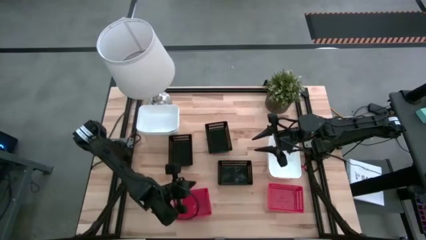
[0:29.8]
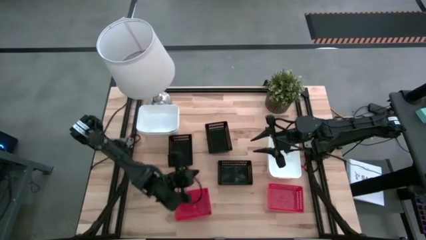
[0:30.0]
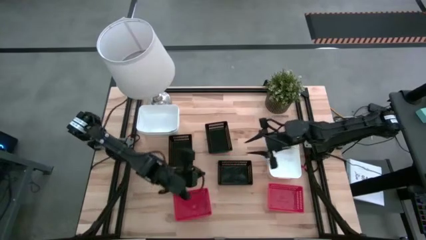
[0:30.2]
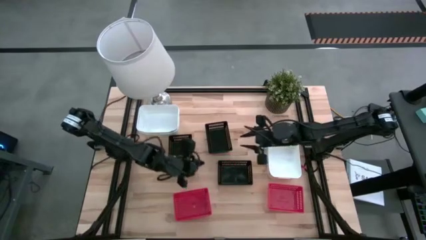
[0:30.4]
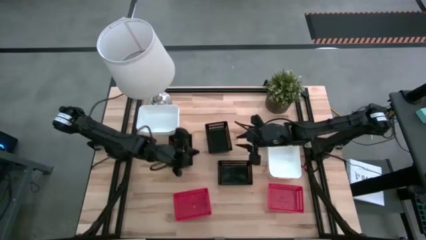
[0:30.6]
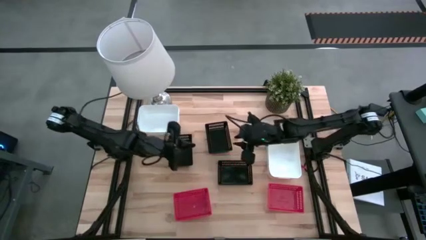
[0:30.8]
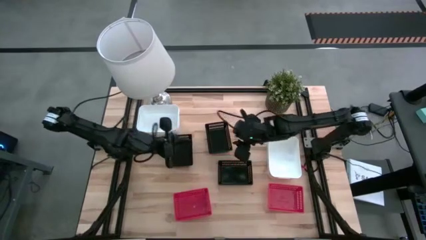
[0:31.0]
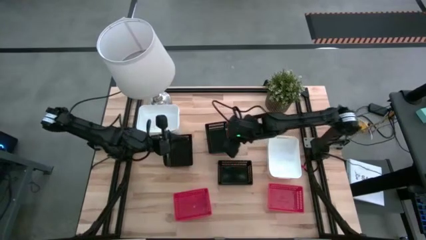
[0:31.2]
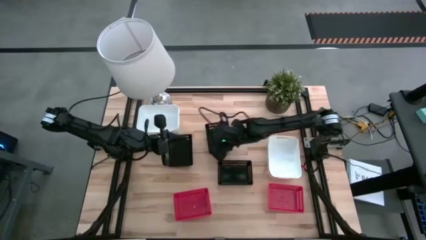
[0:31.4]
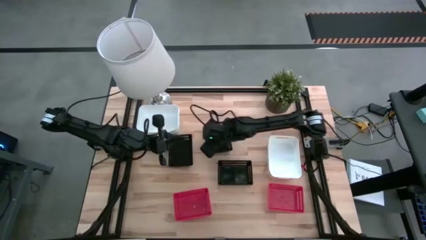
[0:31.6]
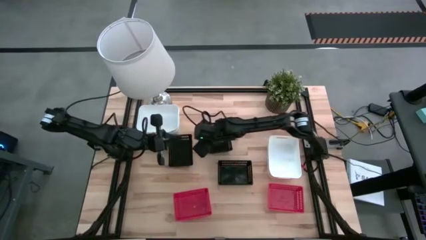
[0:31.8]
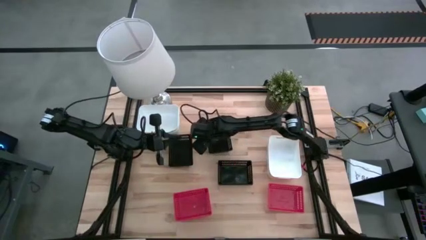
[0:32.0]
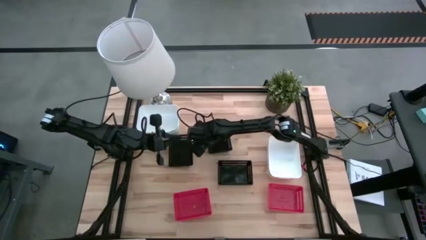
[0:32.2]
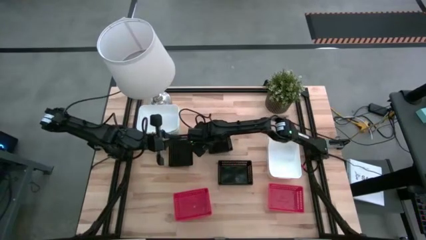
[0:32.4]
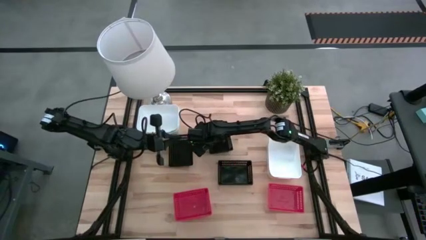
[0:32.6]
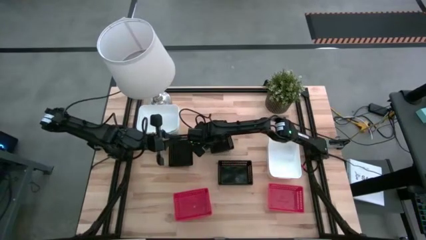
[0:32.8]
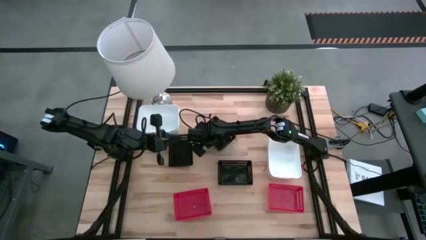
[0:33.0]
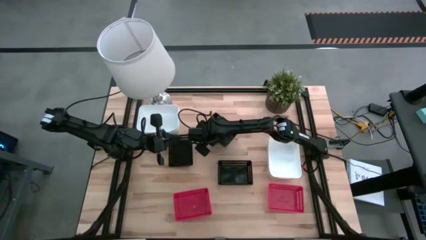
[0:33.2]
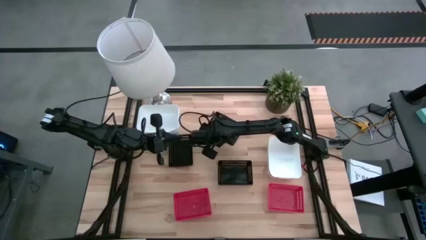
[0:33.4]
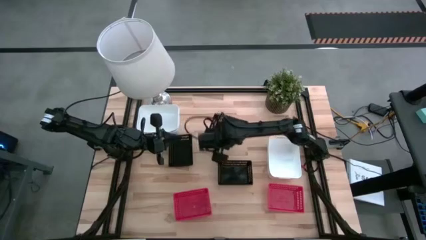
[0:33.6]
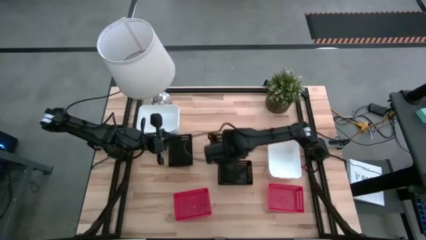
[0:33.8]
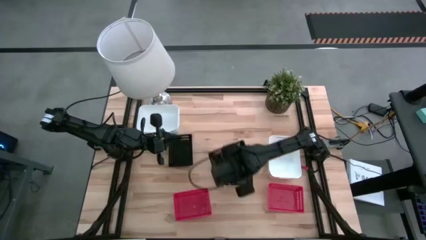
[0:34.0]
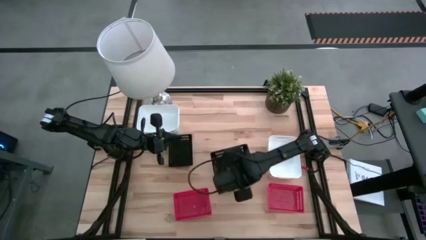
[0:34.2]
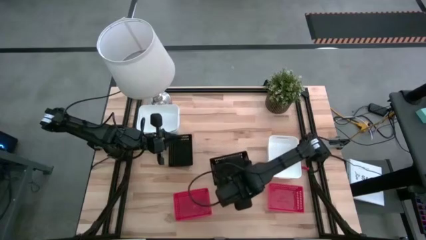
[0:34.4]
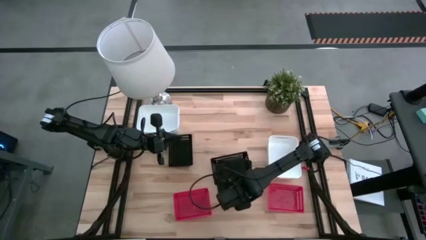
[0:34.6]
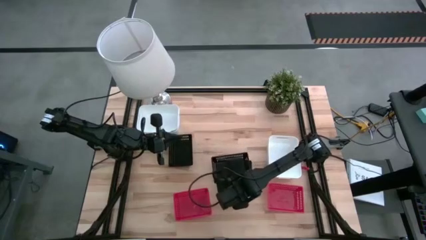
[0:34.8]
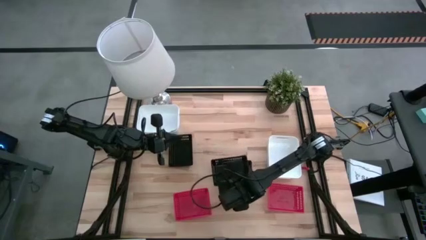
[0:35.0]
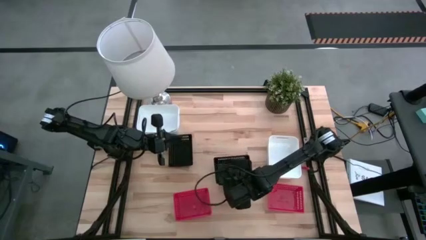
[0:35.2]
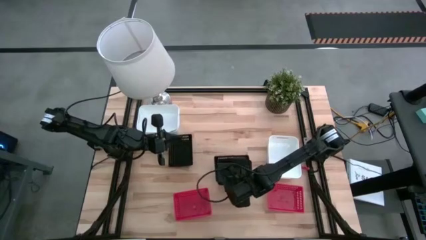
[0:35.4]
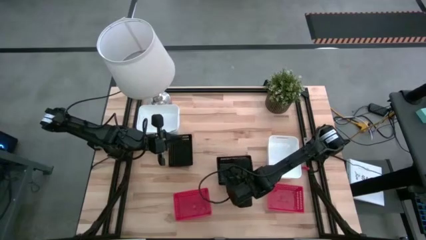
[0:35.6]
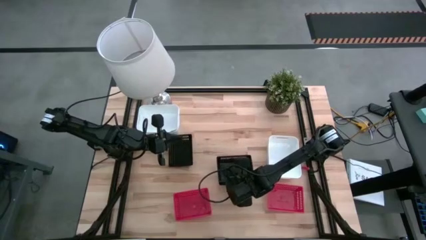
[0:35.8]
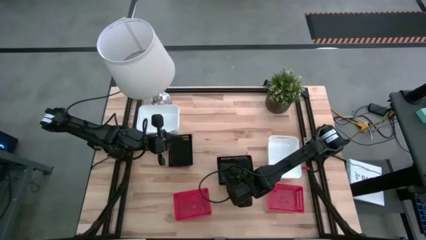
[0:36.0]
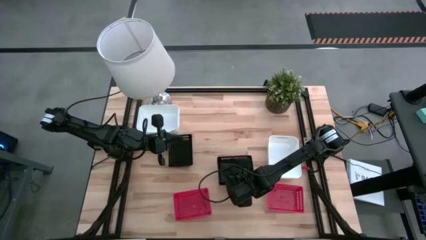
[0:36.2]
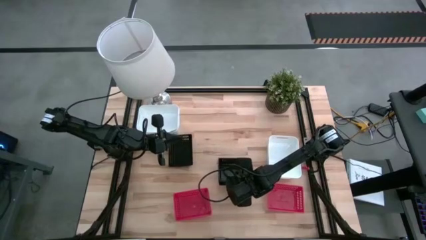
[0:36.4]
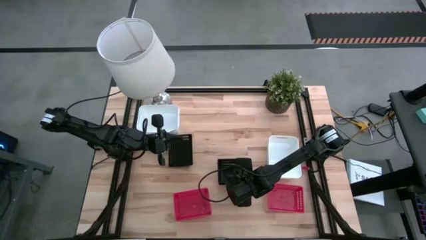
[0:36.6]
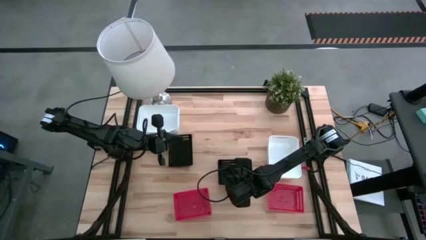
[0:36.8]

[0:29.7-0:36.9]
Stack the top right black bin on top of the bottom black bin

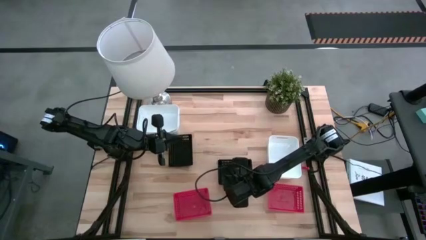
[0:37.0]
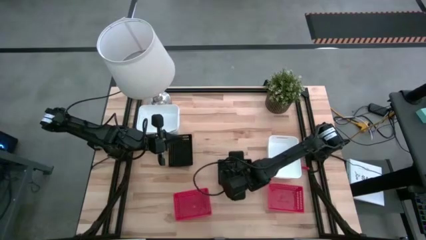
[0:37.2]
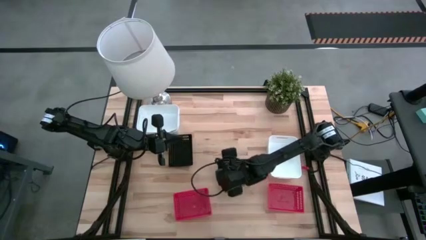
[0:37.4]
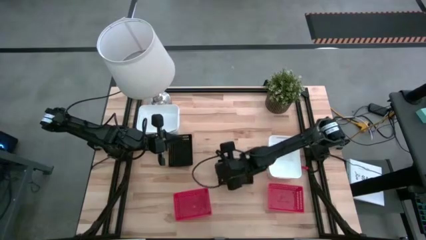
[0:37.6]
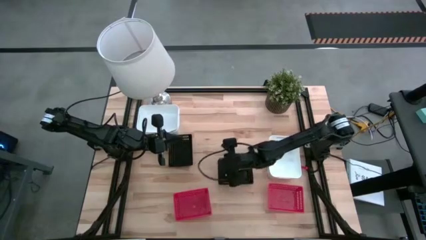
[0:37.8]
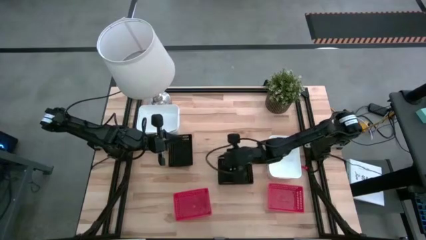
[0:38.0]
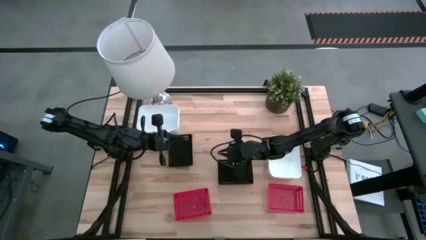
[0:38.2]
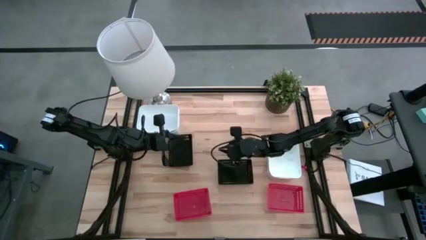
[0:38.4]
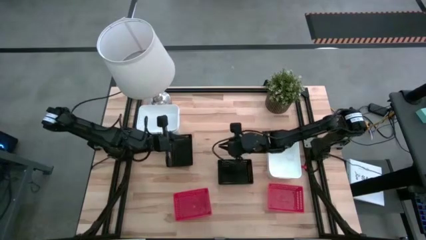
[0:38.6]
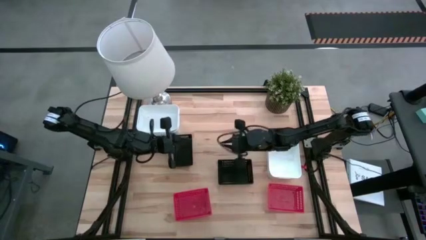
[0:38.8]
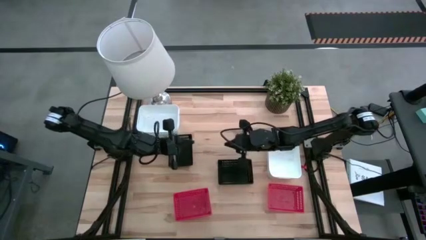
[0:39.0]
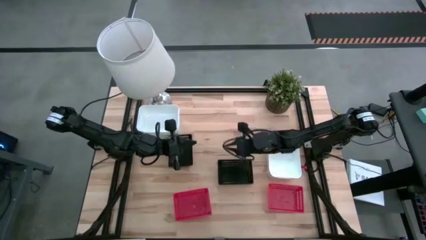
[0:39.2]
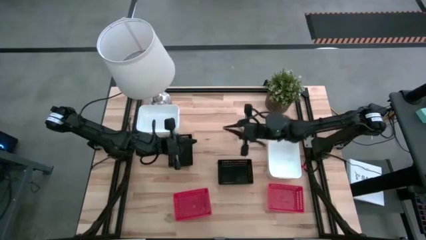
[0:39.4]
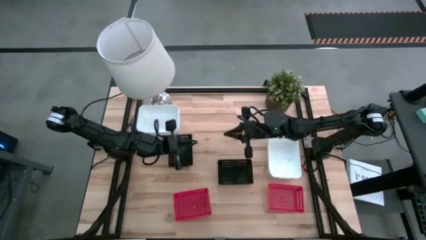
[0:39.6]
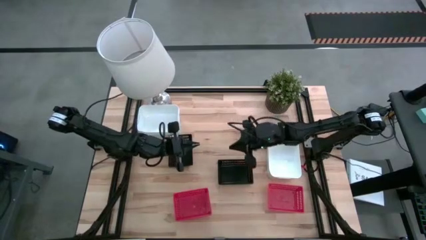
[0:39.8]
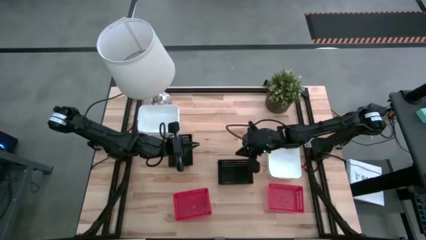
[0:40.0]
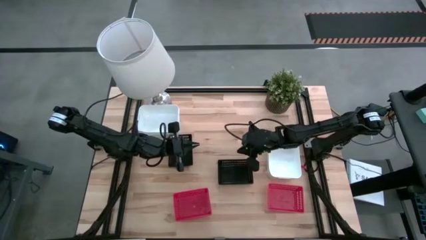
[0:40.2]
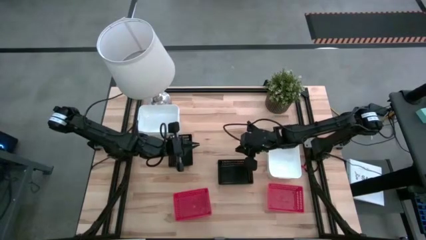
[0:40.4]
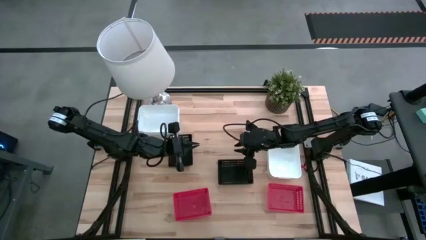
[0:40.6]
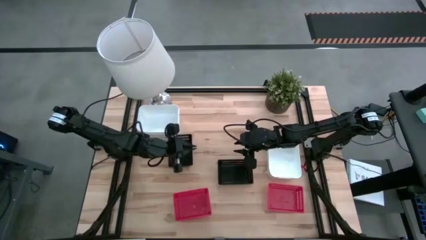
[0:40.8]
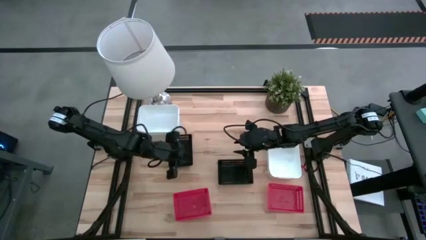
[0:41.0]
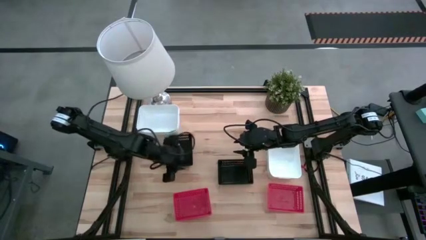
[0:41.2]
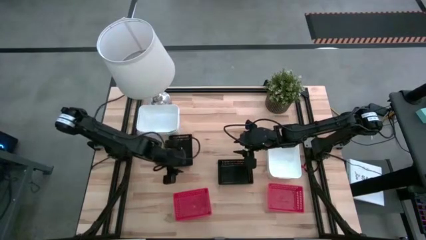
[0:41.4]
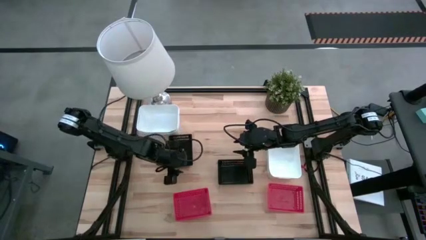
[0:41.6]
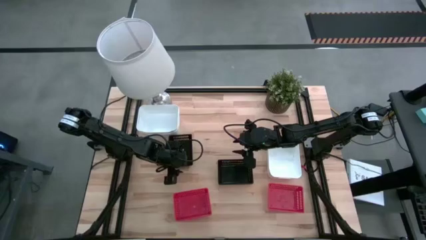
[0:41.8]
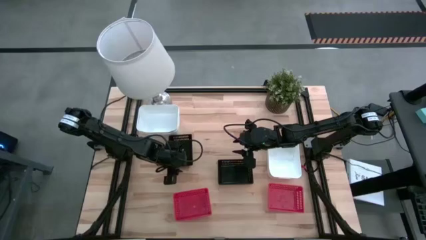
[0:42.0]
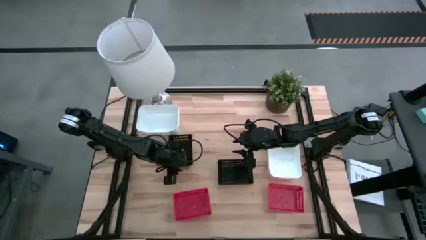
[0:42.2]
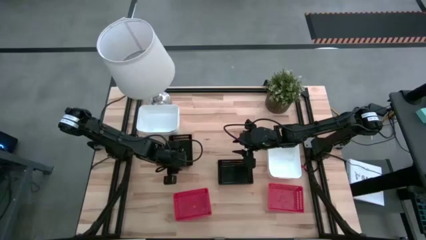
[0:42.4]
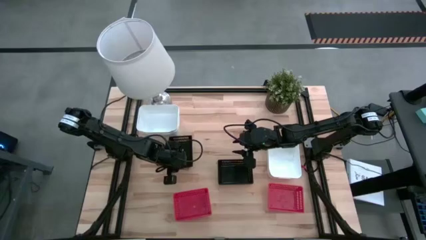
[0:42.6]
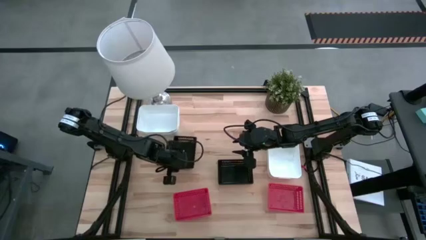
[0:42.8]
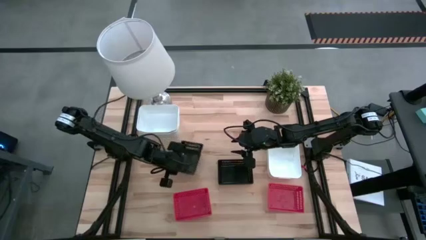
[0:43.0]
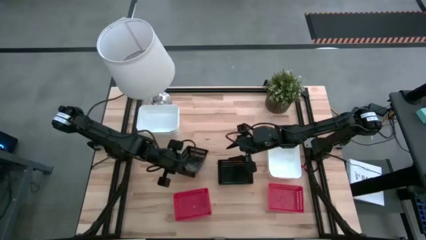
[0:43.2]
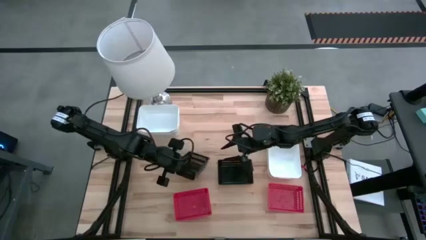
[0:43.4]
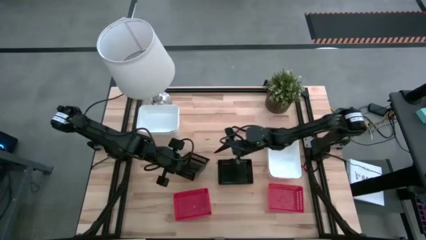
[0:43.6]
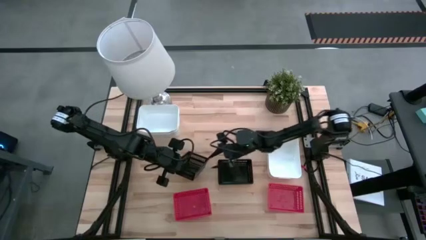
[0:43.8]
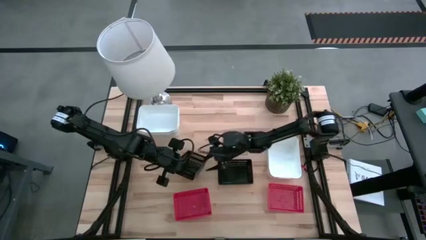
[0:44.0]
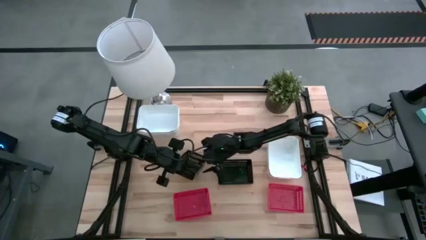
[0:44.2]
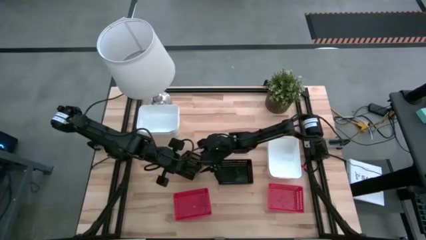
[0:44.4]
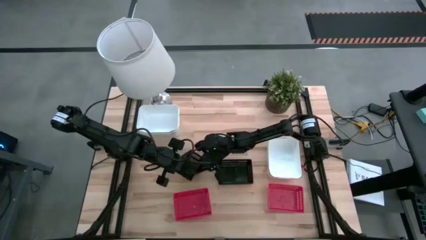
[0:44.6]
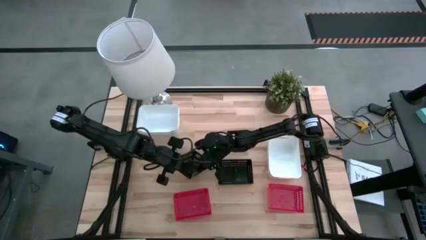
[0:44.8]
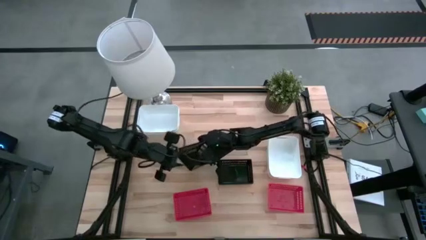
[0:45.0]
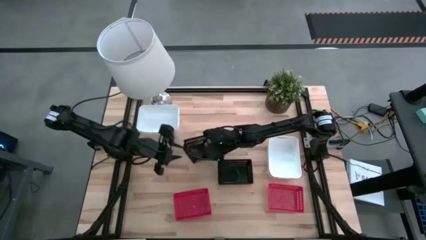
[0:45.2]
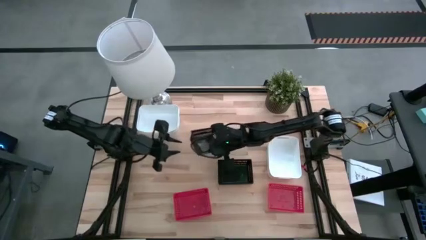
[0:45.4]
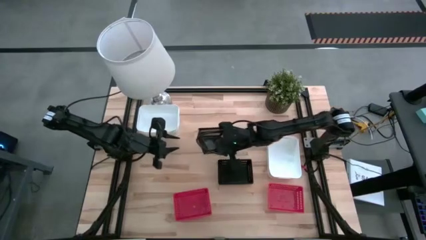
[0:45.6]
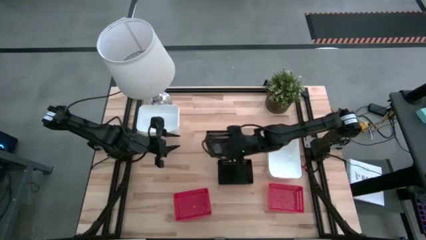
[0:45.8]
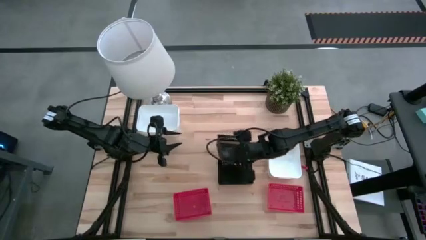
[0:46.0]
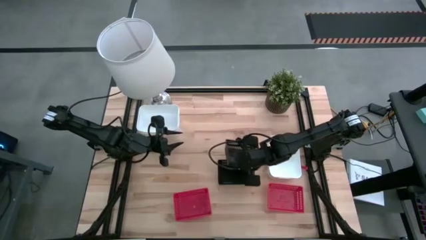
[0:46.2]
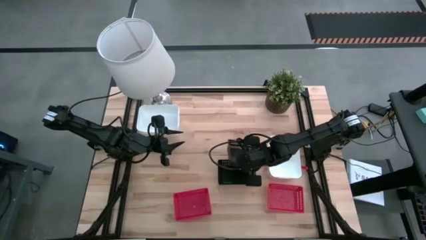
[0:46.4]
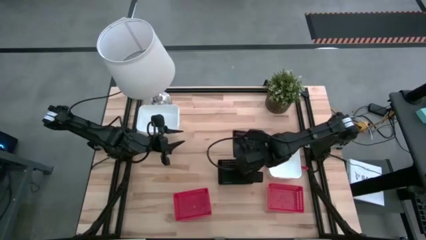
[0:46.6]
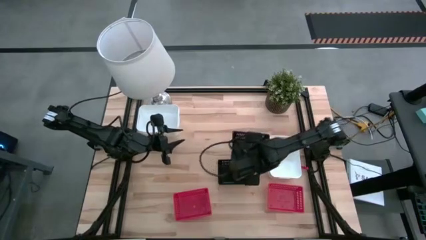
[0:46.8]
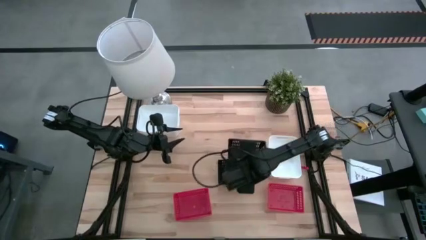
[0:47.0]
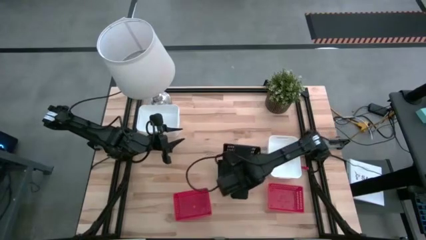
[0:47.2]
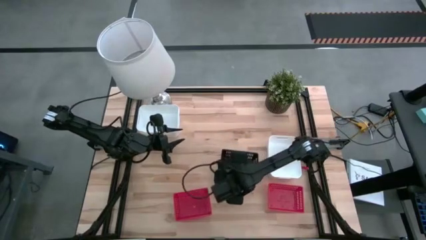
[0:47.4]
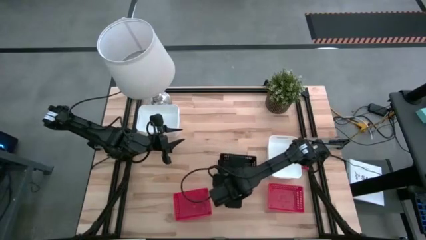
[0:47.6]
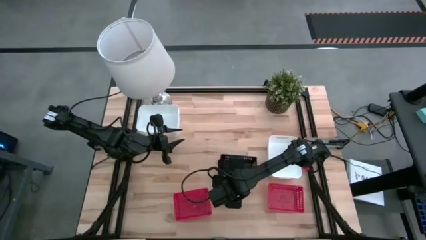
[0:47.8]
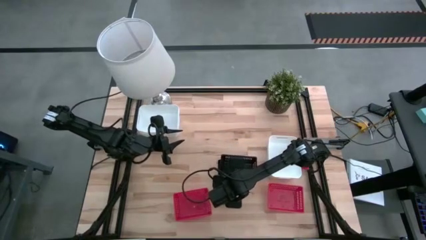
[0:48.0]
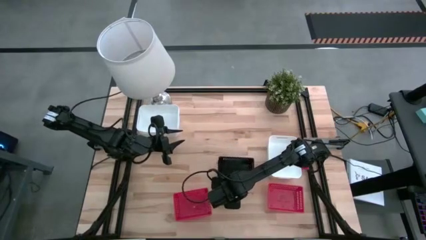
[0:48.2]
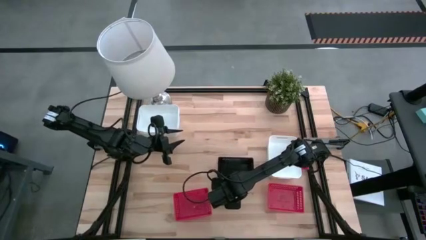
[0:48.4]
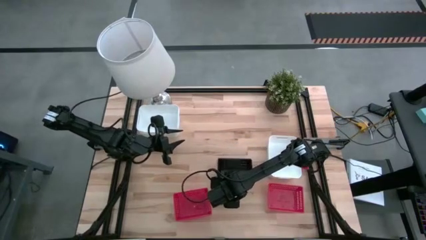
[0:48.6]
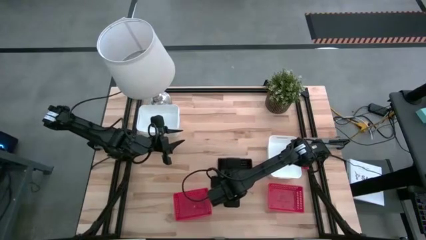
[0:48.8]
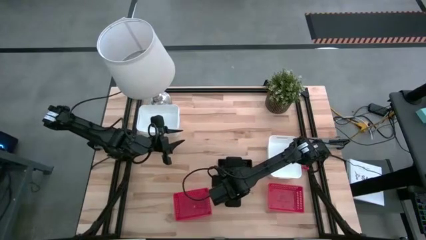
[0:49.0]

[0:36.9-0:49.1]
Stack the black bin on top of the bottom black bins
